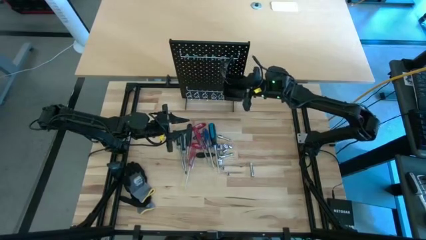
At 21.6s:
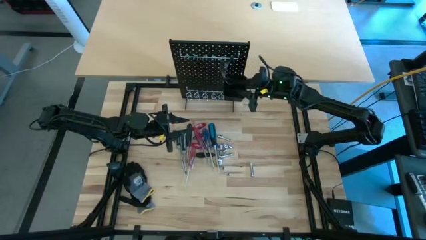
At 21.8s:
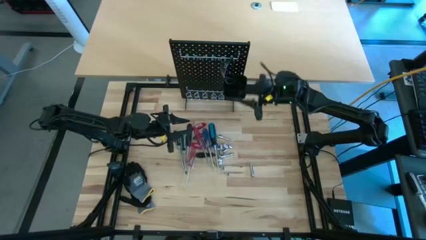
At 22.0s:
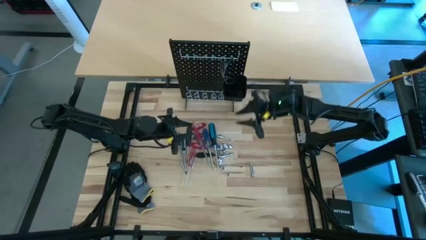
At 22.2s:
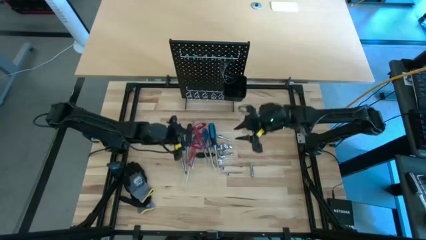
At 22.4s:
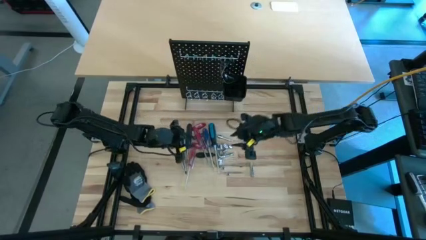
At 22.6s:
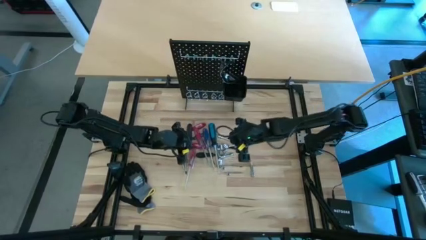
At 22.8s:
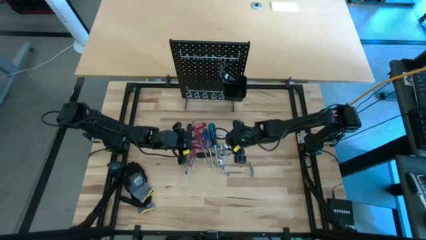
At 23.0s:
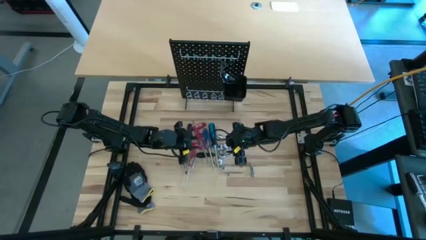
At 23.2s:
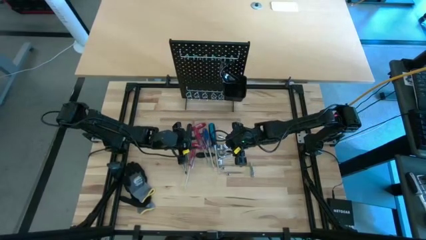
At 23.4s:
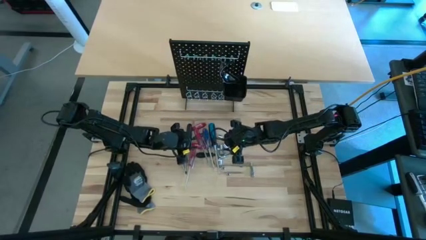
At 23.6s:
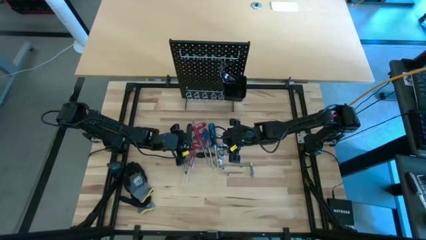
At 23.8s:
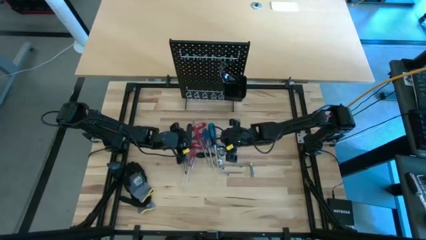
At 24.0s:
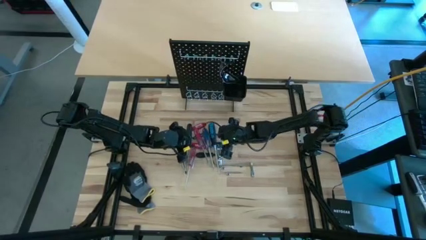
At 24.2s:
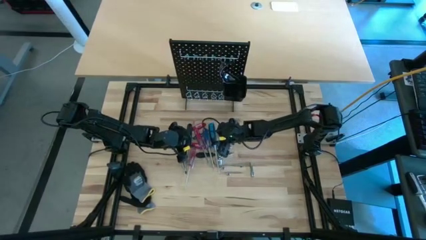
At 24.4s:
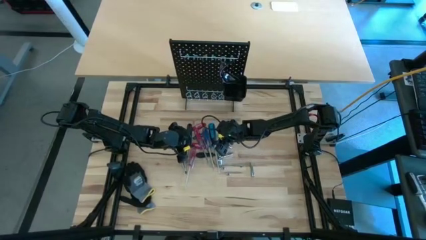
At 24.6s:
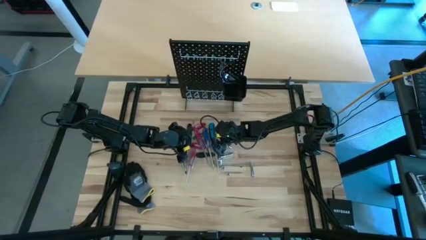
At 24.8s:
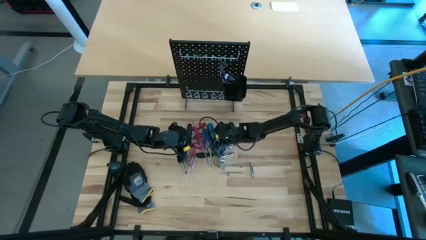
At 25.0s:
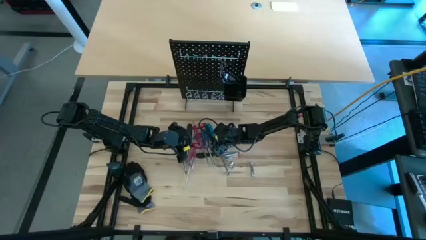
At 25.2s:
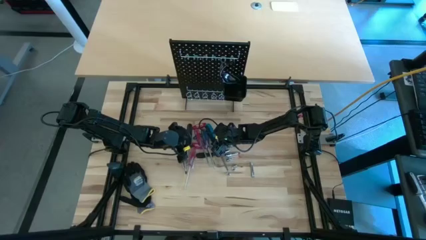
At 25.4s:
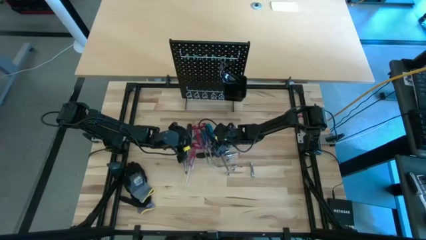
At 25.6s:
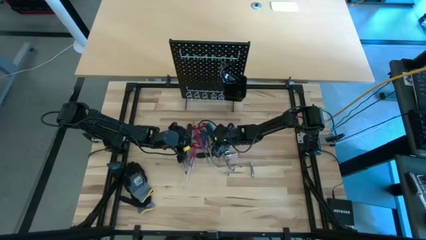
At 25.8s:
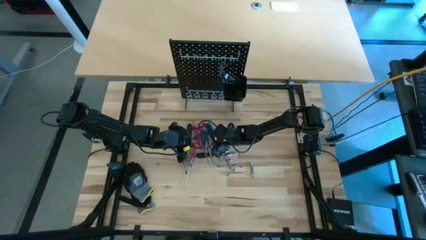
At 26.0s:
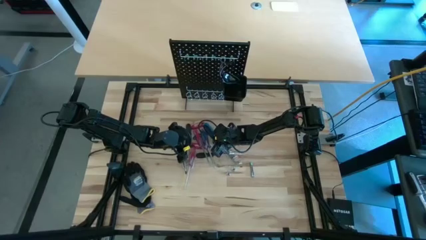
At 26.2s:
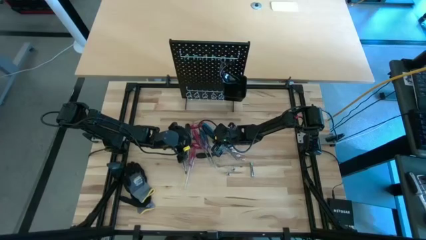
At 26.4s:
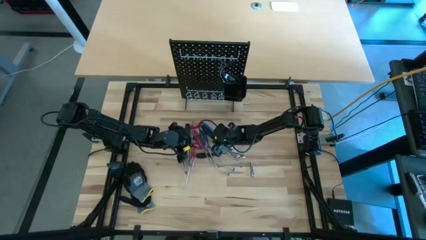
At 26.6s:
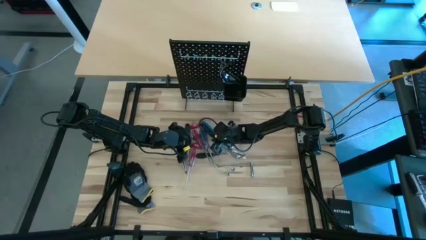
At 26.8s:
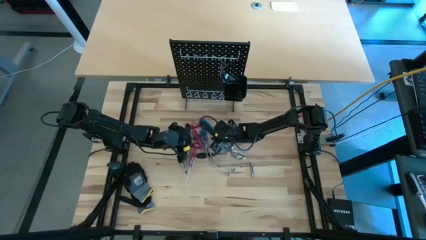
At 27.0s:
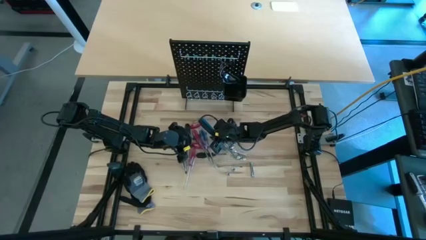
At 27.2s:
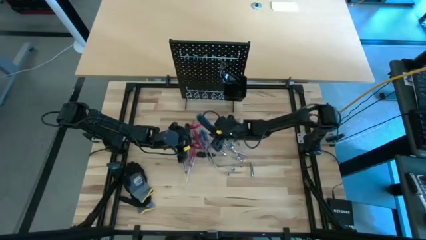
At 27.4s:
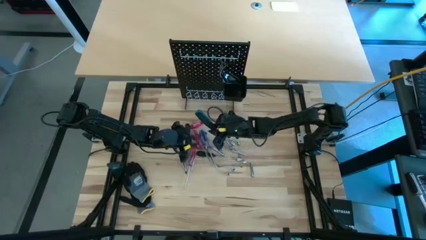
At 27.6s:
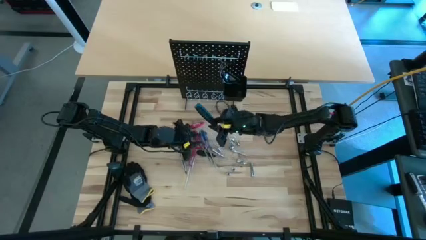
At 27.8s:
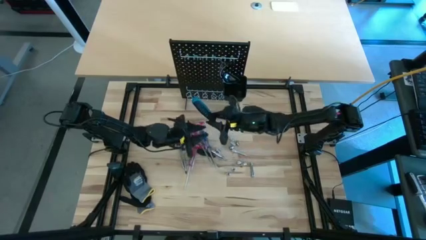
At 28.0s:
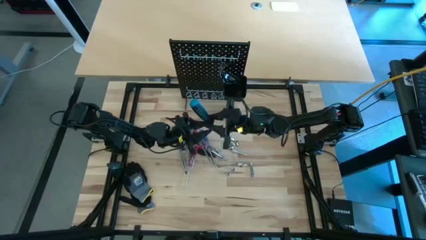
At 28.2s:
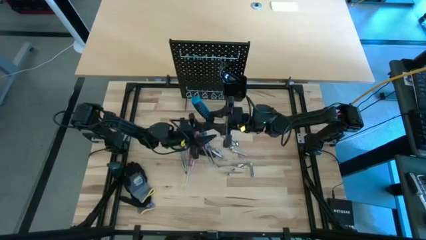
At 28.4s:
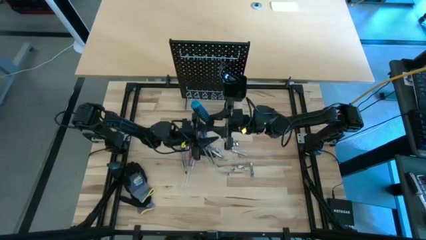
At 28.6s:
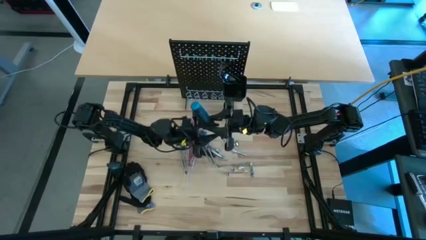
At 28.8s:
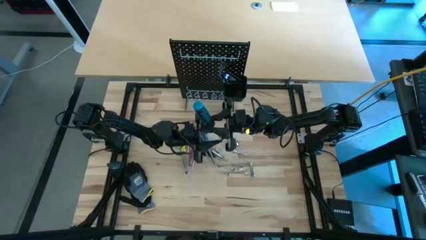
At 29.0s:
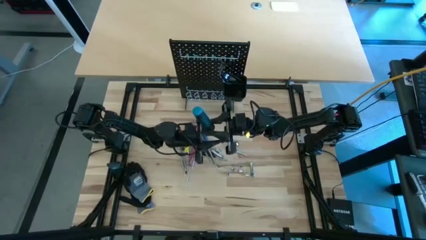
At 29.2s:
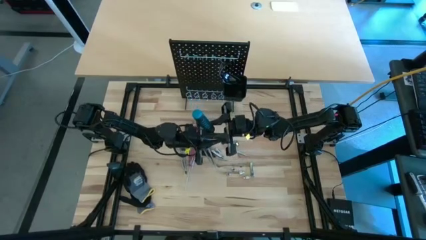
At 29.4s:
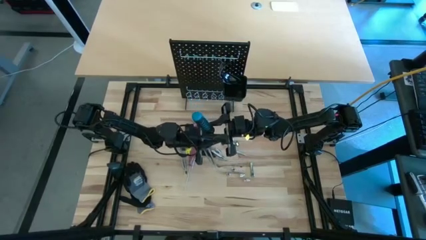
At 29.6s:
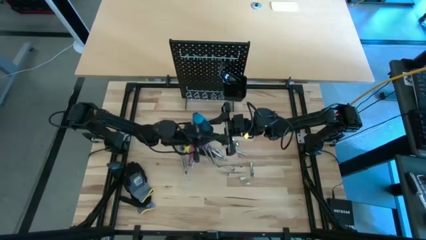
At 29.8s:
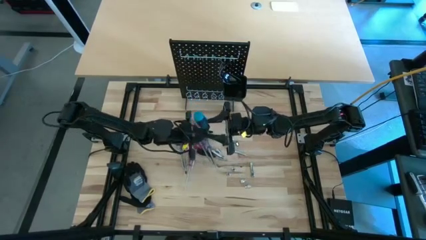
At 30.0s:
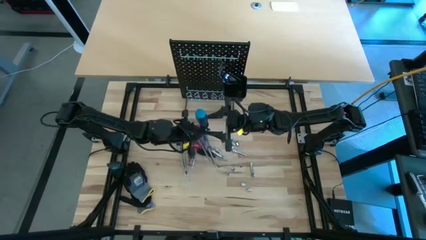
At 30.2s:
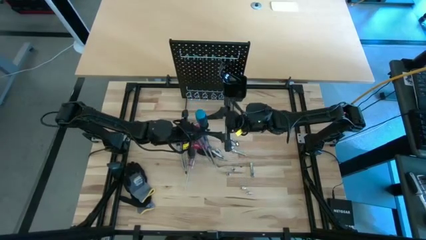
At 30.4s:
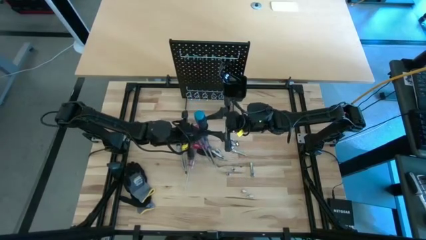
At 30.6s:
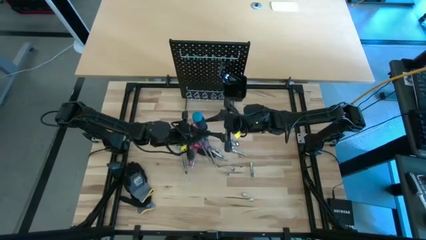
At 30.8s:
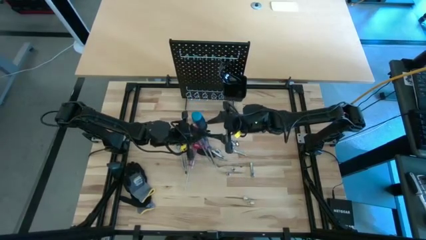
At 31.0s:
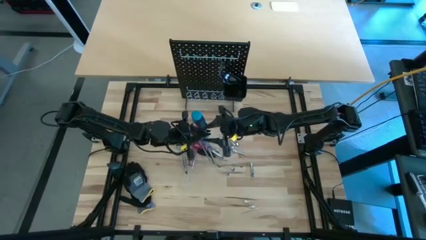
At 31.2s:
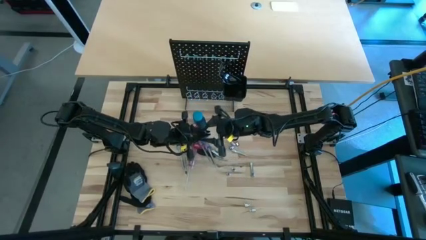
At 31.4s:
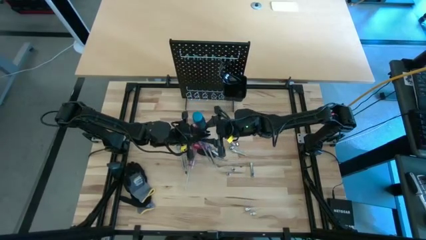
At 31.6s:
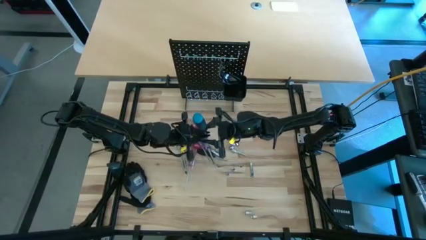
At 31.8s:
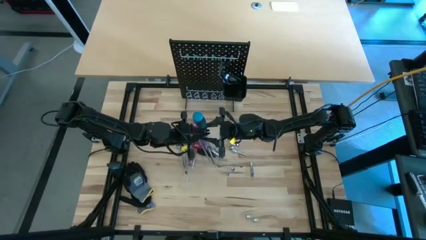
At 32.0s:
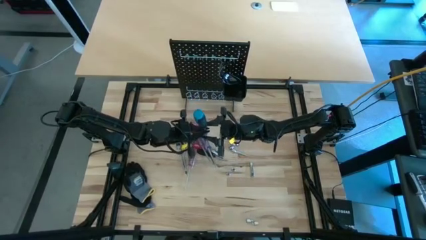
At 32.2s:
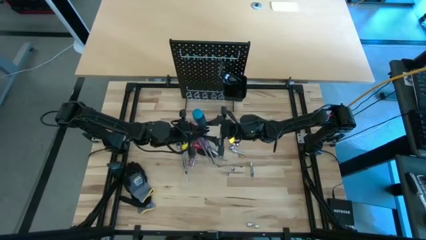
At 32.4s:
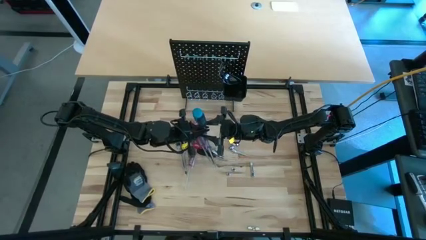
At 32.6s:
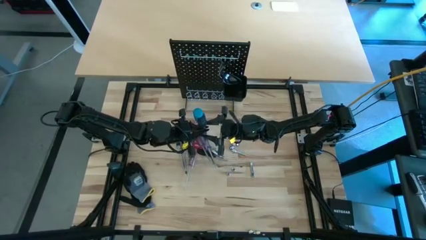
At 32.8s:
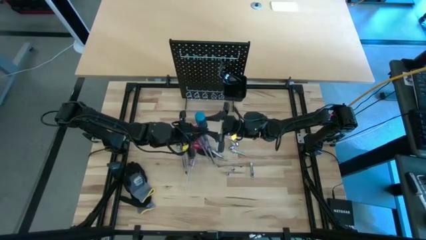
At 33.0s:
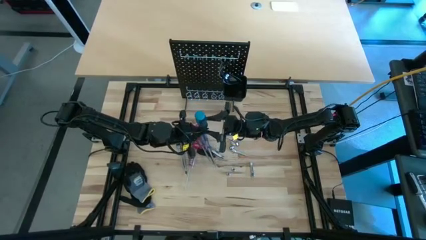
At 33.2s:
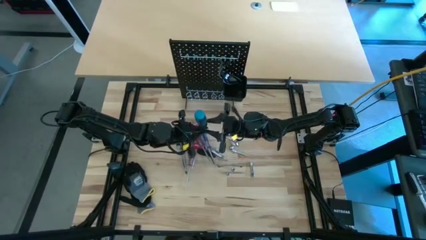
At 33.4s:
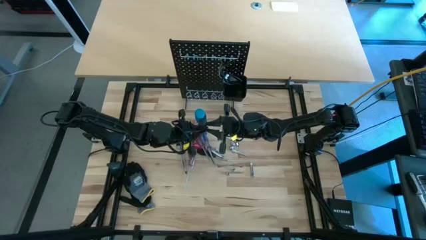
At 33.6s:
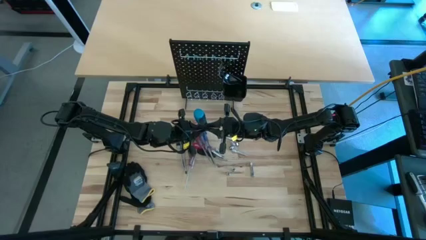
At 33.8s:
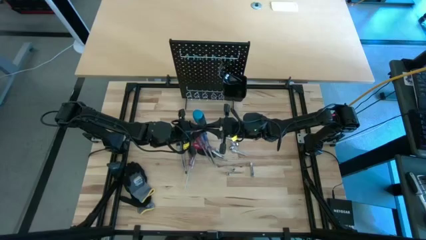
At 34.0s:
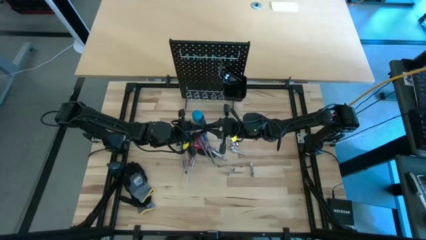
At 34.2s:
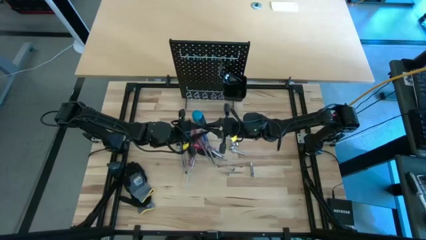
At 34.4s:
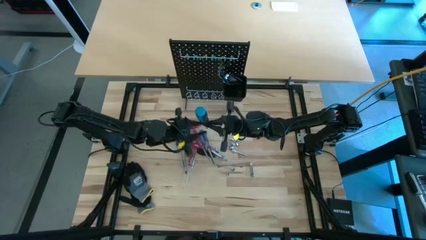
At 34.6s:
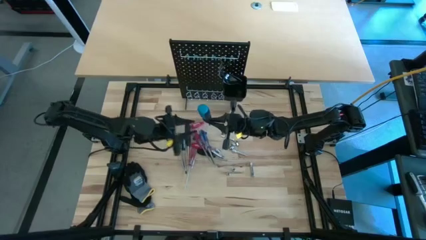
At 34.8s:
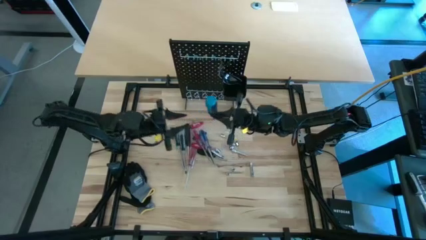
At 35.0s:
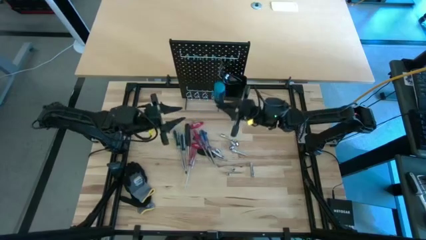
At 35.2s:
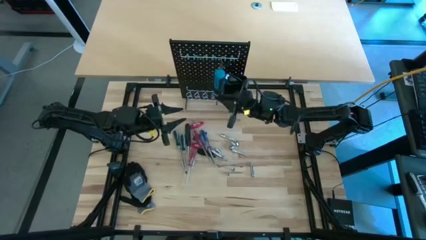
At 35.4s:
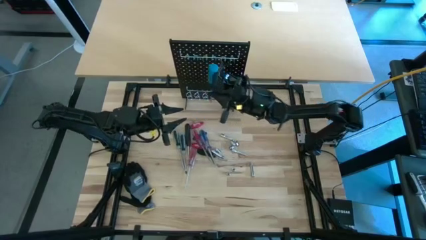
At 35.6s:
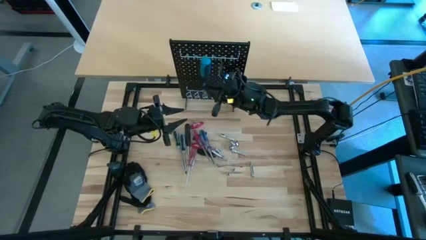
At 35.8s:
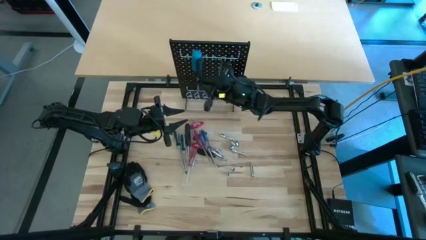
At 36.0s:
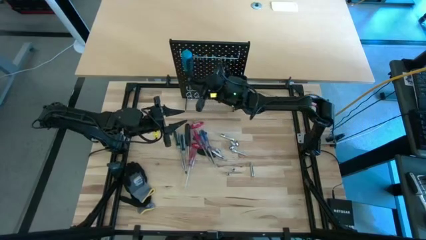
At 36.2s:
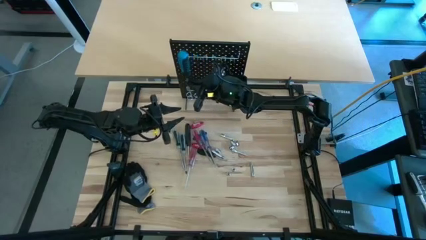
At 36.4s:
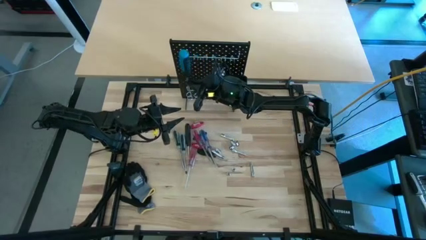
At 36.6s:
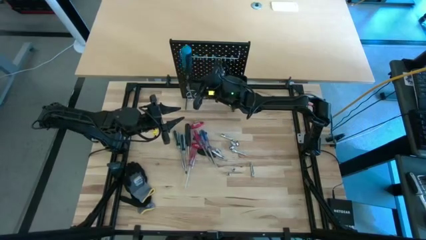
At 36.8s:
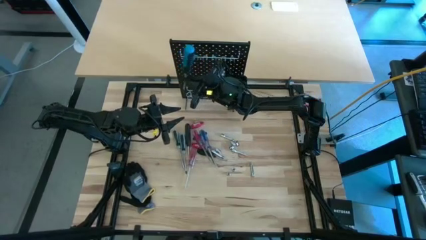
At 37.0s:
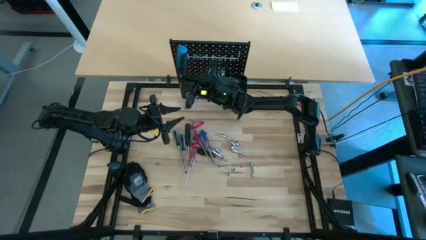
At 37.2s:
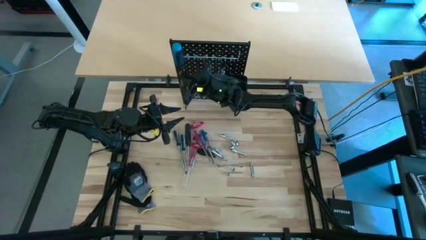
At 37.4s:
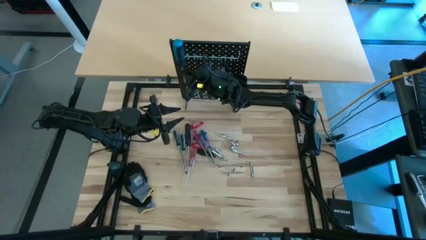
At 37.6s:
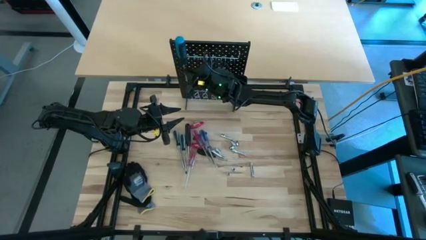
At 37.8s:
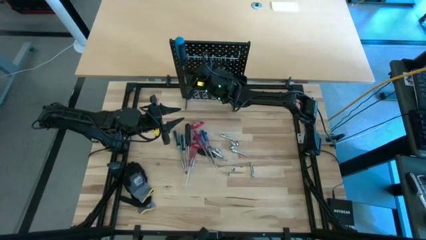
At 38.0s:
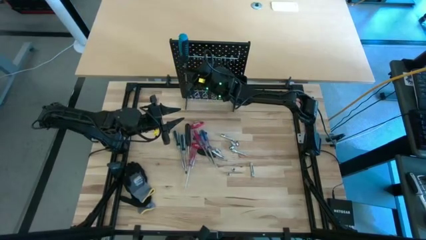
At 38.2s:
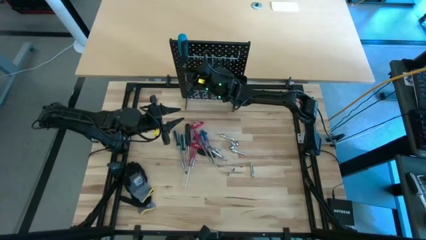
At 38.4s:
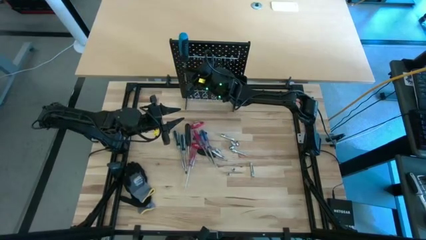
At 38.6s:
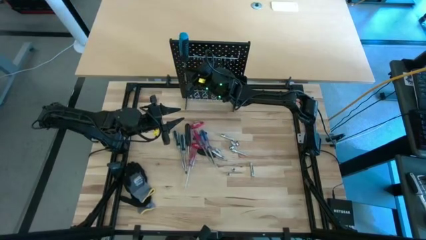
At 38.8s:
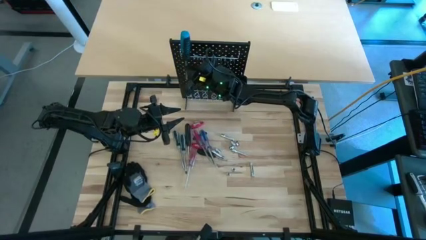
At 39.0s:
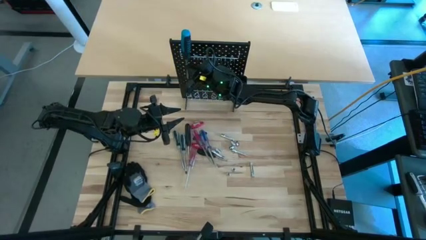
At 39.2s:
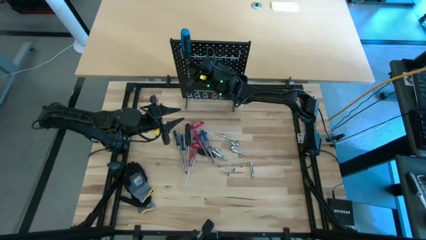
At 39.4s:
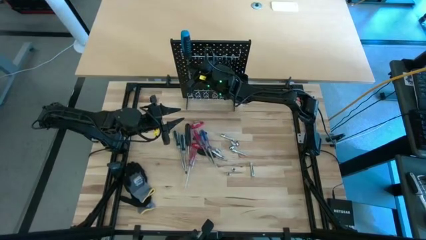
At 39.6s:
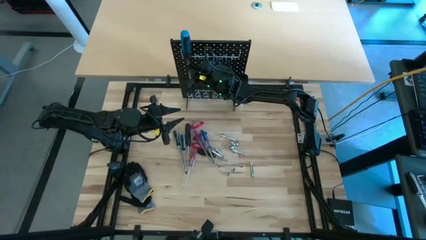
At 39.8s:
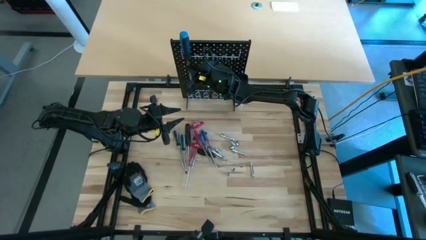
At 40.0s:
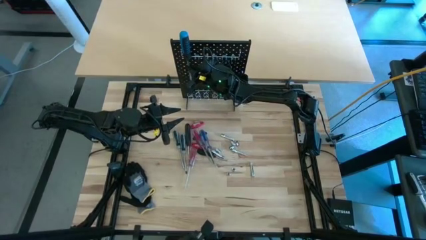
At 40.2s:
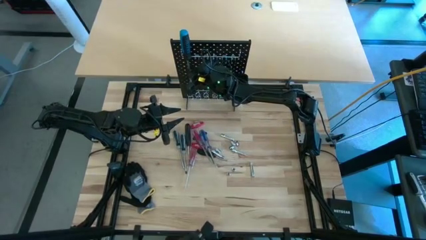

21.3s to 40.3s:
Task: Hang tools onto peg board
Hang the blue screwdriver on the peg board
